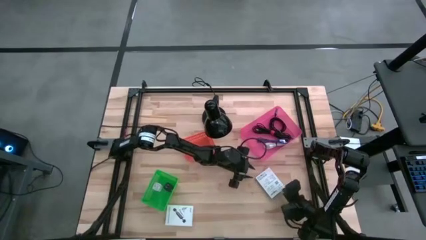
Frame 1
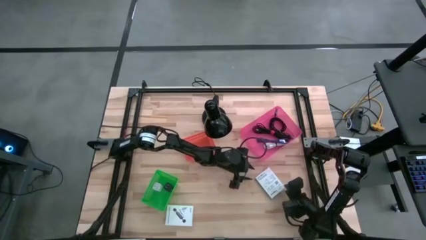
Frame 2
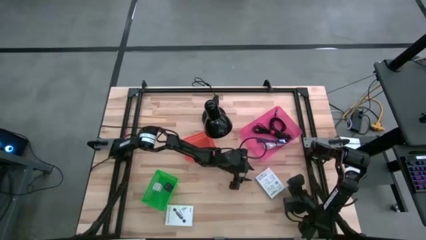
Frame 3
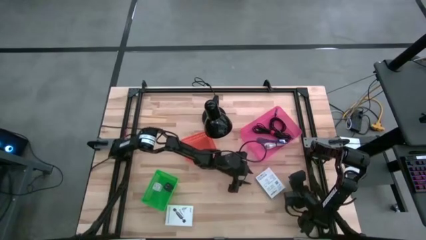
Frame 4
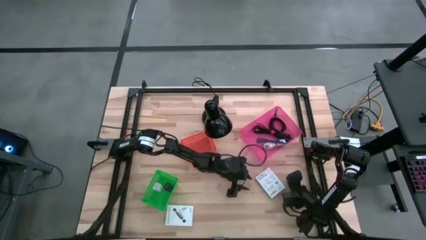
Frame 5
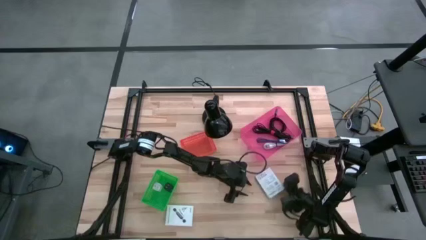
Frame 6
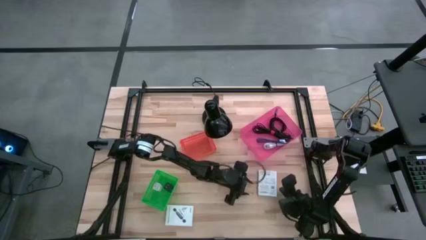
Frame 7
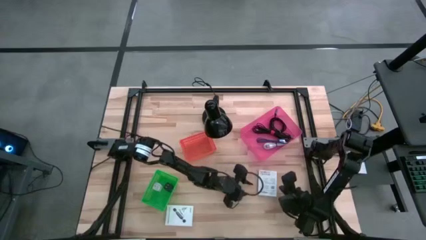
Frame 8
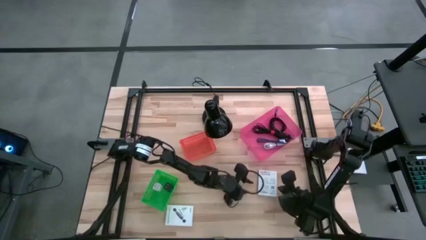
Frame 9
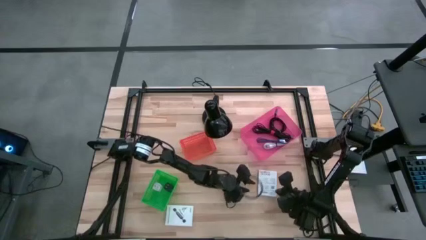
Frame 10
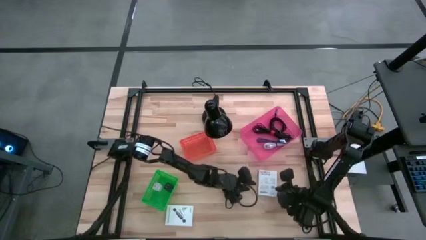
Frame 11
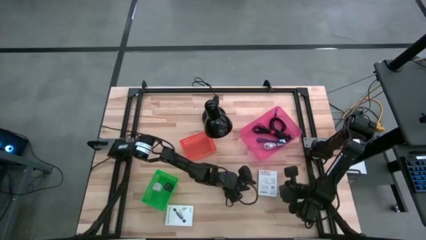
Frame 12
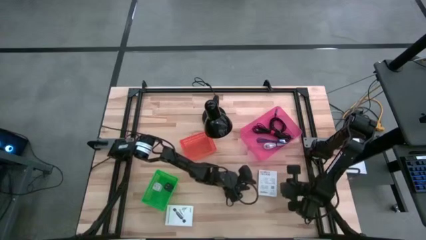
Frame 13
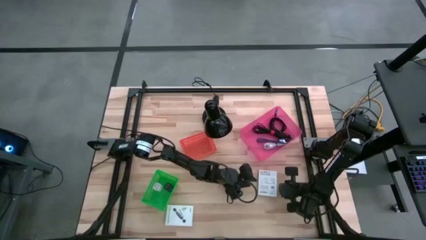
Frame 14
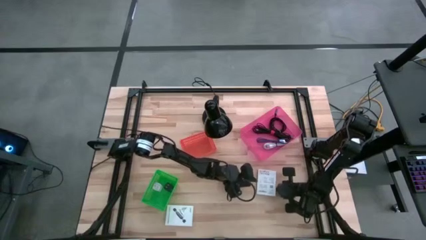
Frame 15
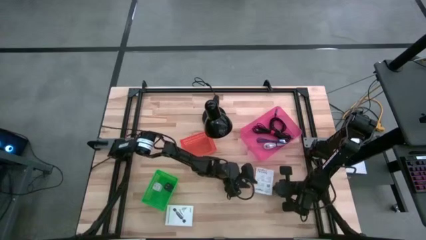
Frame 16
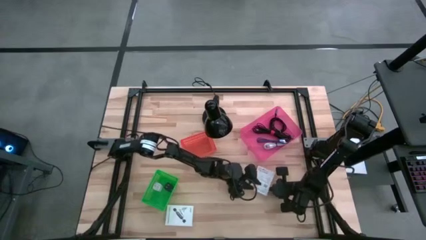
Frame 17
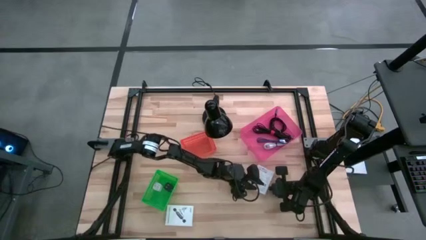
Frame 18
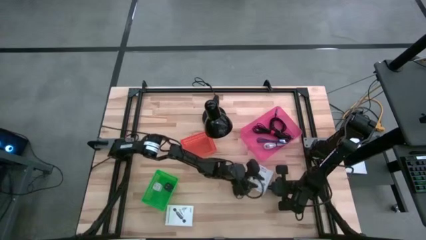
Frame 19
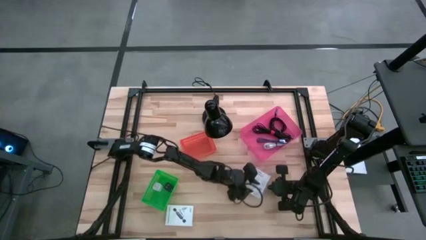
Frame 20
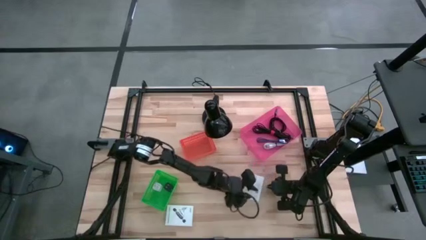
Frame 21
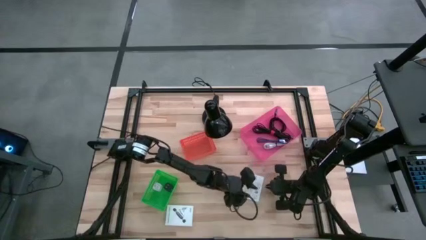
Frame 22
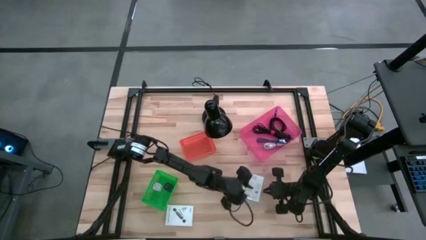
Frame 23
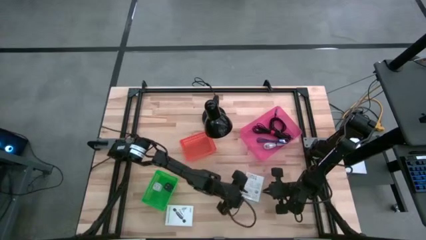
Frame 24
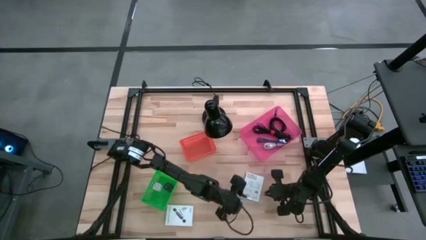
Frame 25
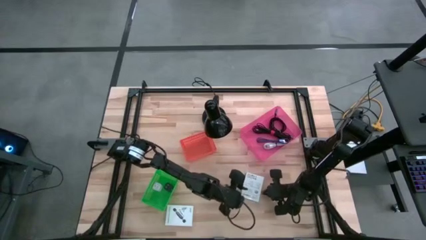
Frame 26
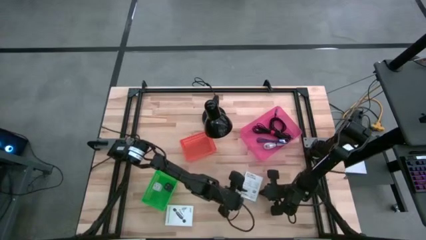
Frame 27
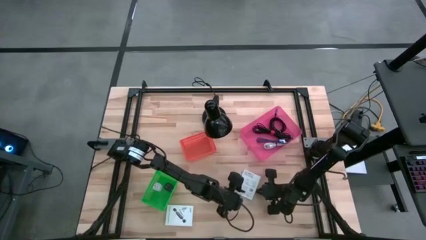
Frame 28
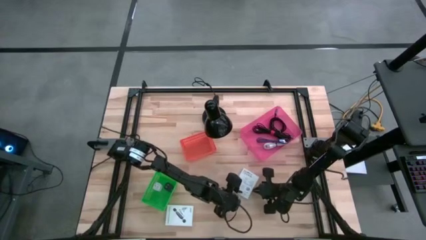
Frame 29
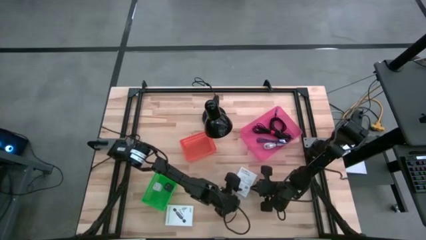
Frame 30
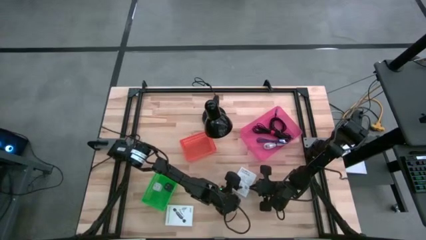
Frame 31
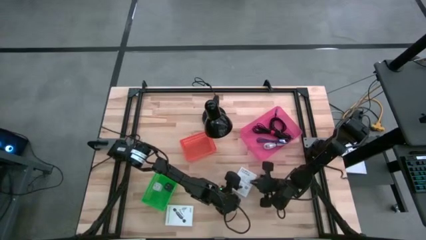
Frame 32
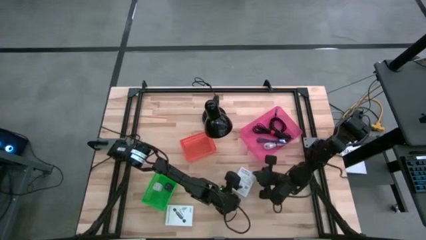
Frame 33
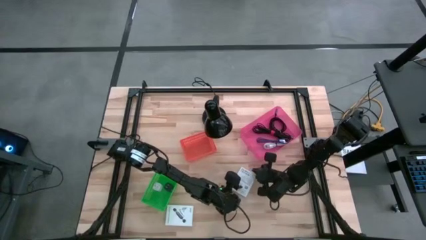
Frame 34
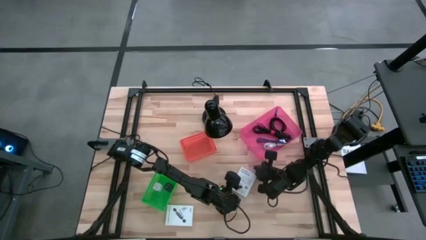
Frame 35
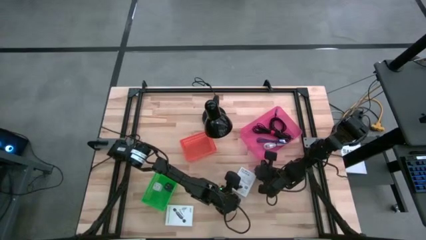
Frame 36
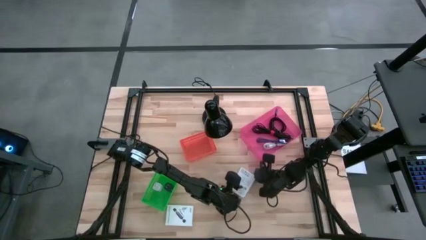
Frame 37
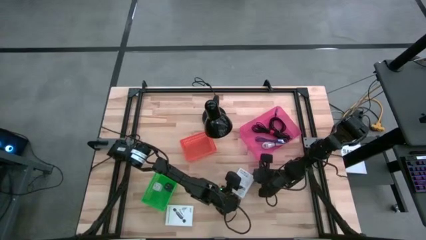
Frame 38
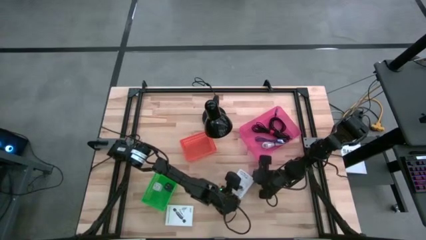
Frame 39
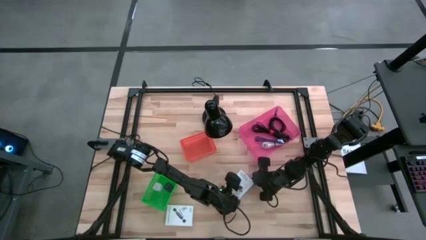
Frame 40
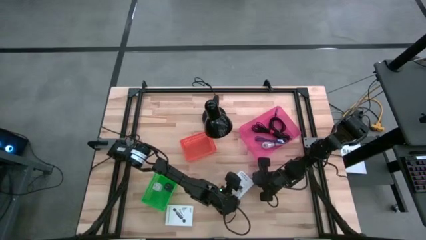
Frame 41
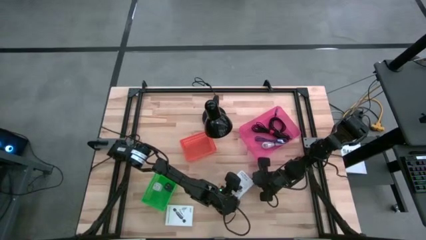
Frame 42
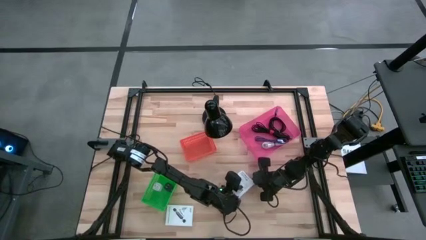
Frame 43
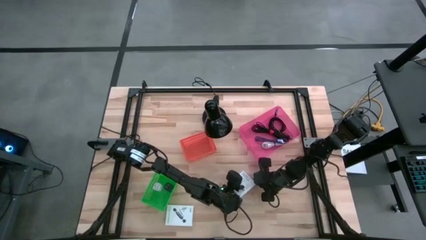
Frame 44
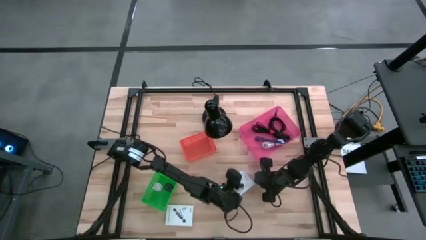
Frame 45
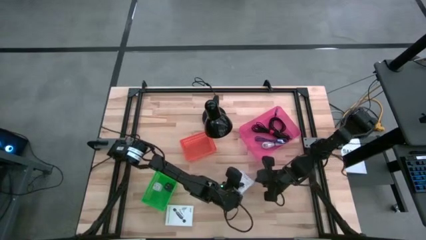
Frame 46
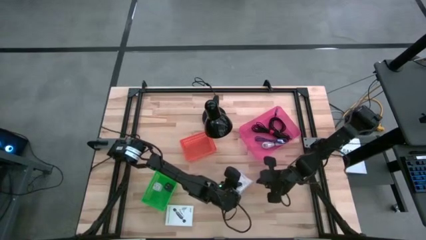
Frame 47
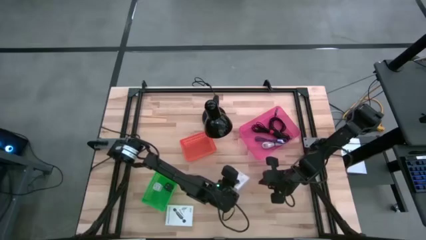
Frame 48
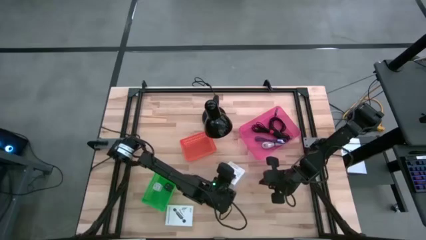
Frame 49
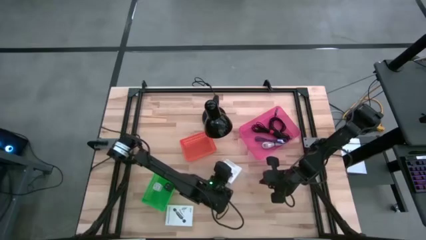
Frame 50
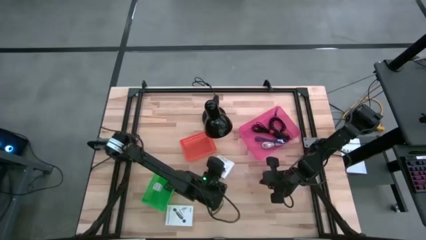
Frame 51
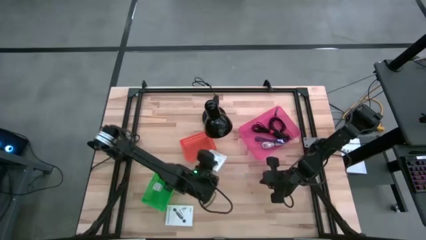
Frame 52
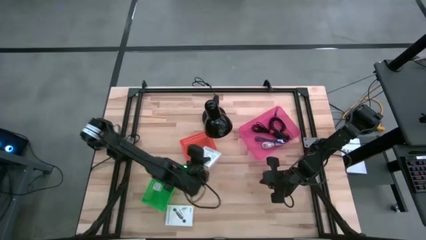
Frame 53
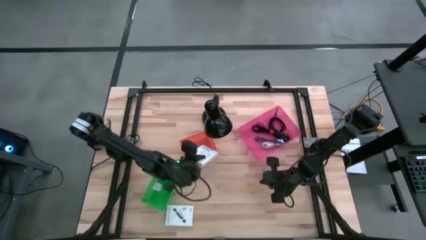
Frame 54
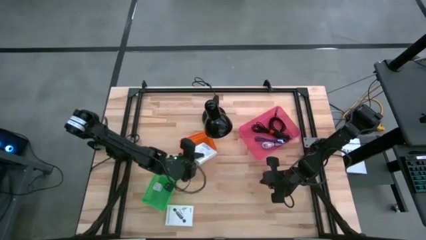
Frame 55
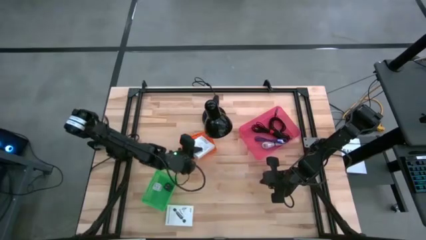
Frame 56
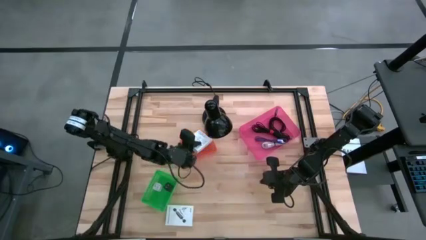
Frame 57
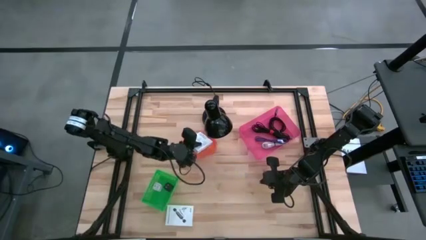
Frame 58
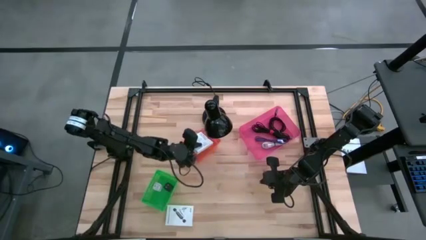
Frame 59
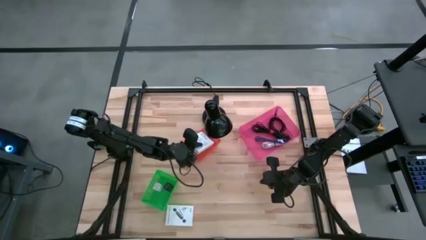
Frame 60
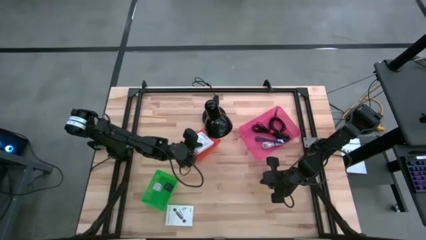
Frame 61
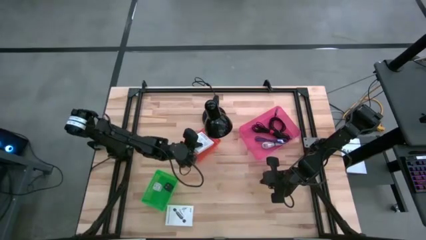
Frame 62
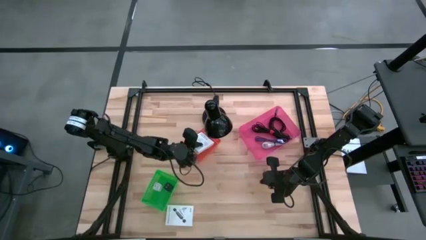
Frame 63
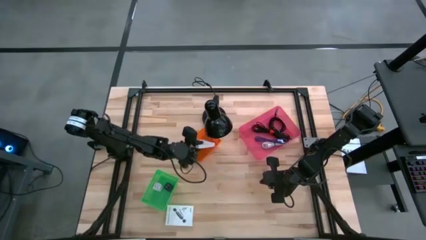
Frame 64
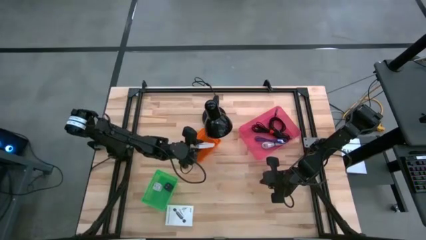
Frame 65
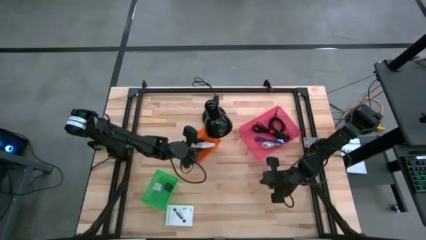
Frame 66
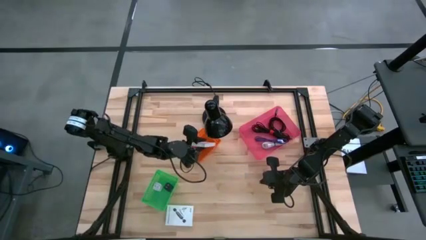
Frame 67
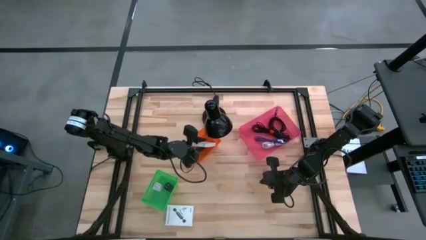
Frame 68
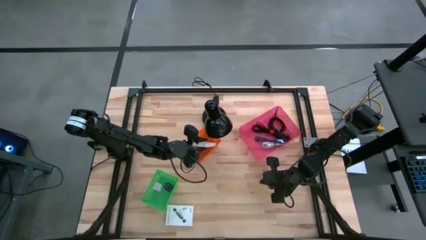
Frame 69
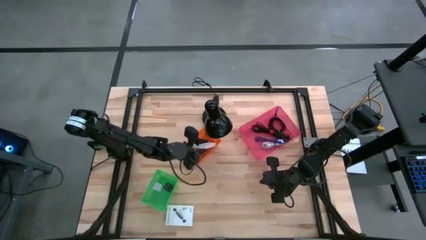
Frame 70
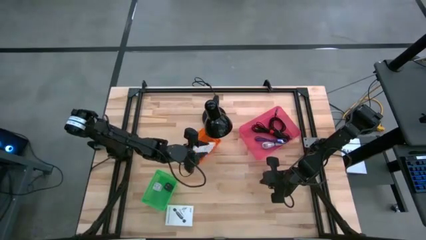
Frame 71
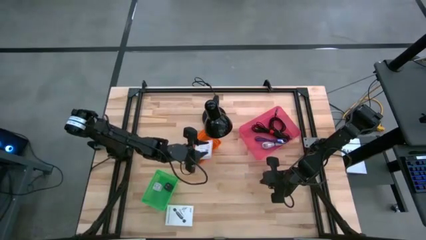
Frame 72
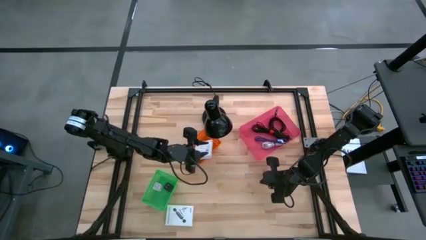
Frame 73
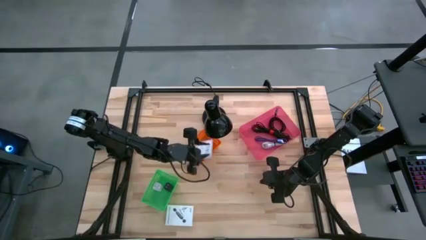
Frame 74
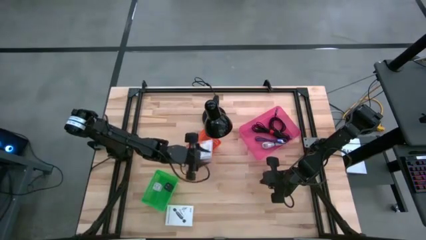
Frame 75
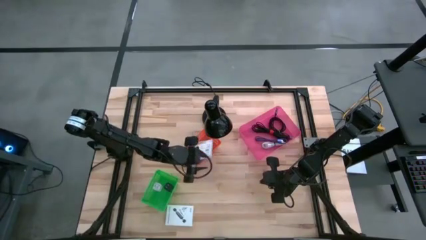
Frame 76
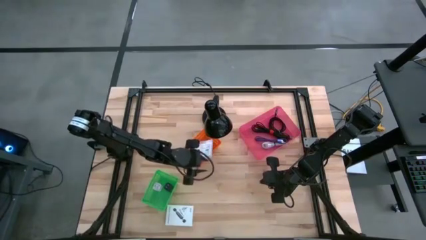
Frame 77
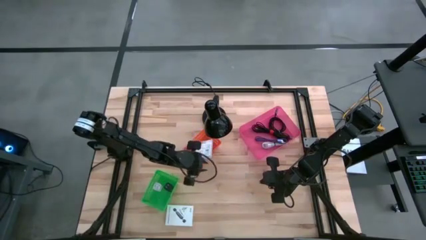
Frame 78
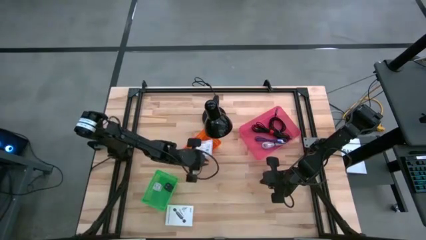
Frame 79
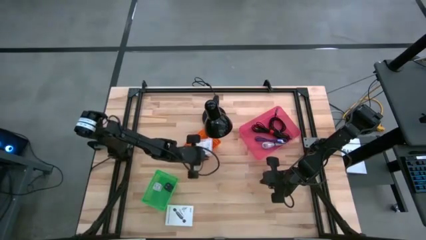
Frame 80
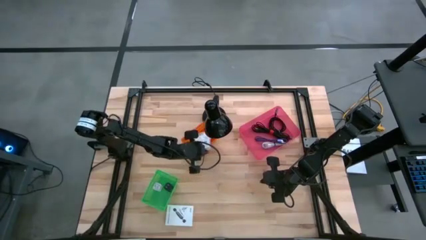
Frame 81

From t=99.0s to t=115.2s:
Task: Pick and place items into bin
Put the right white card reader box into the orange bin

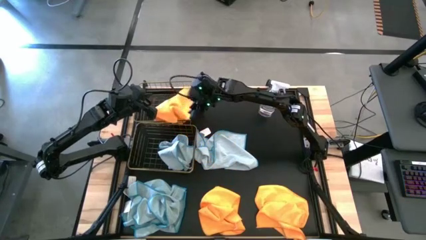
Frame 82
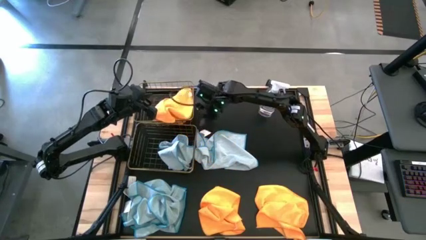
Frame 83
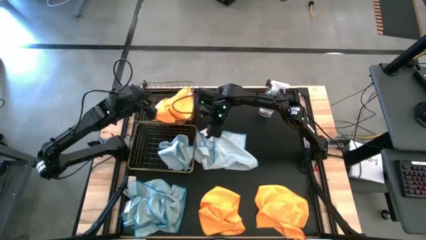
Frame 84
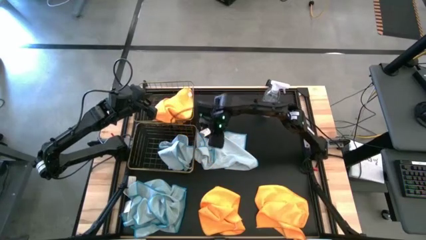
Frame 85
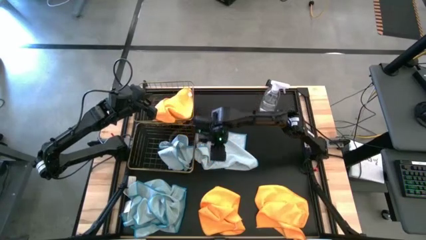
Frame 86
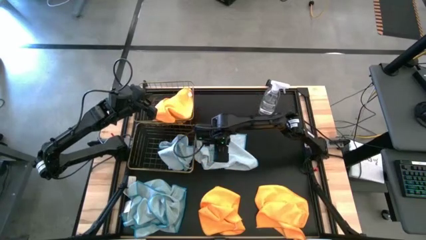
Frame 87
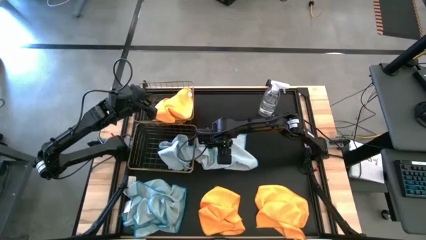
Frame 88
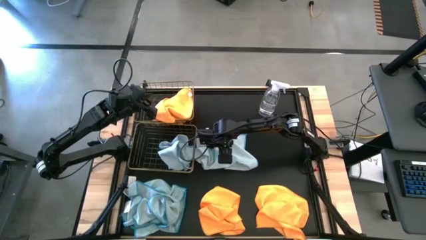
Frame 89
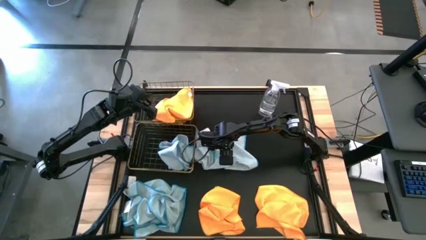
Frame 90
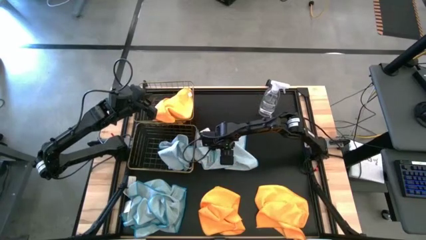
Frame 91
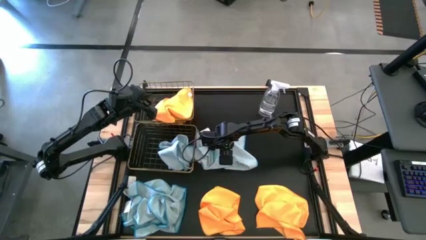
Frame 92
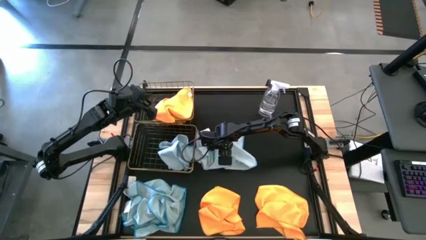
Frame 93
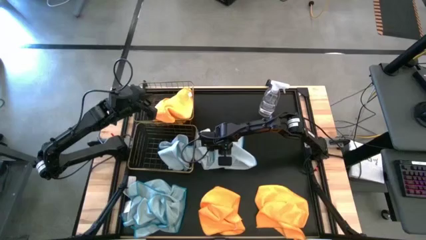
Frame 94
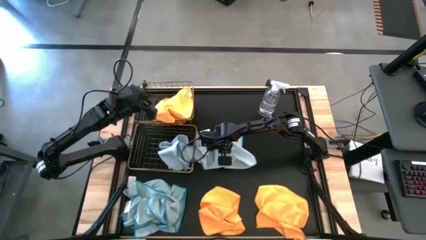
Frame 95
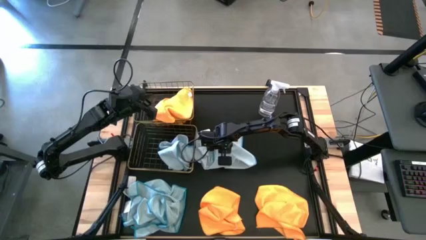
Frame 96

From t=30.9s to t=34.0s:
Task: Sort microfiber towel by color & place in baskets
Put the blue towel into the bottom wire basket
